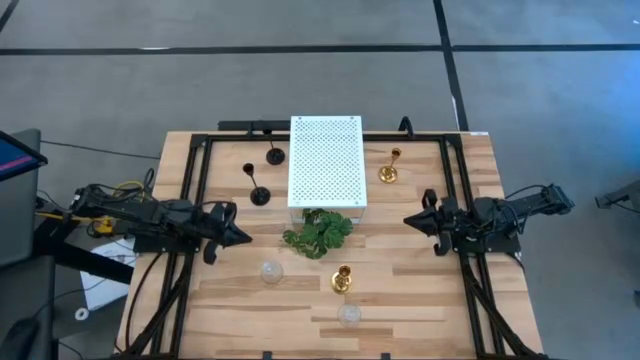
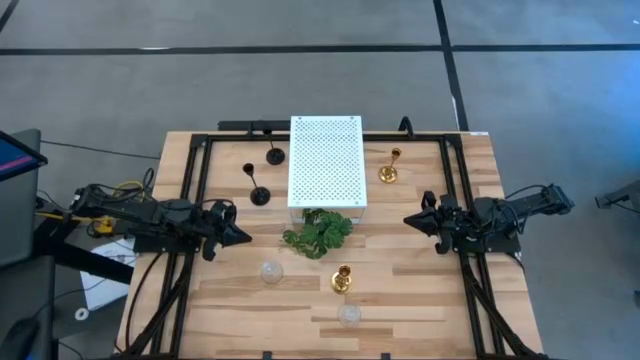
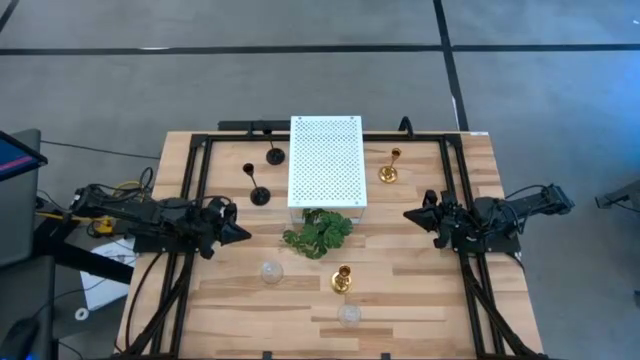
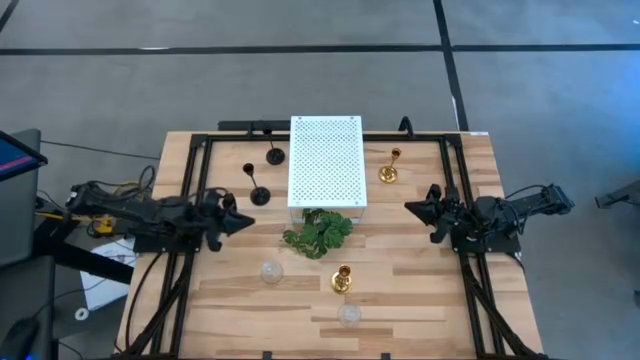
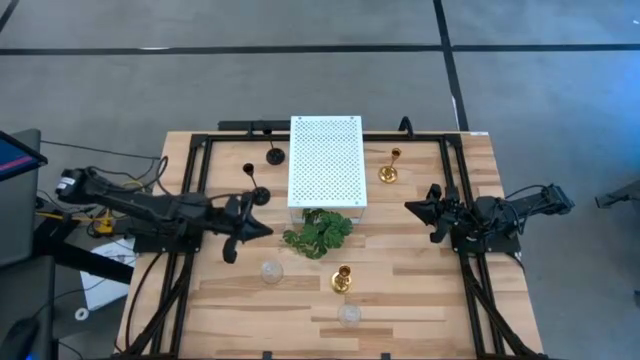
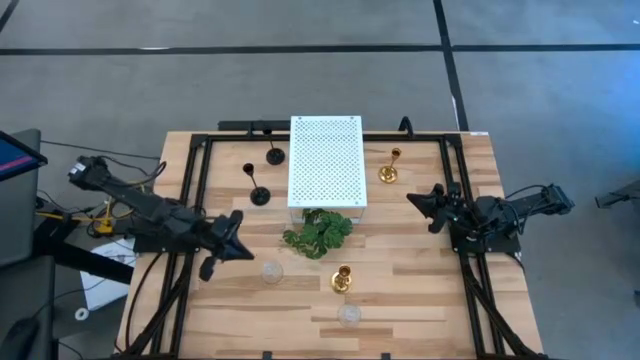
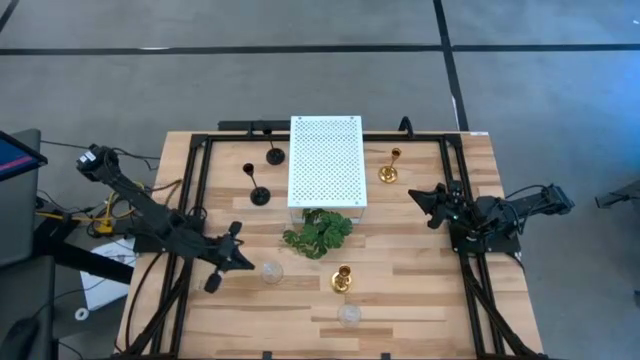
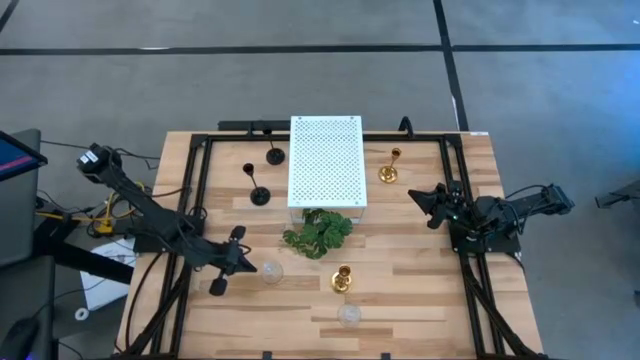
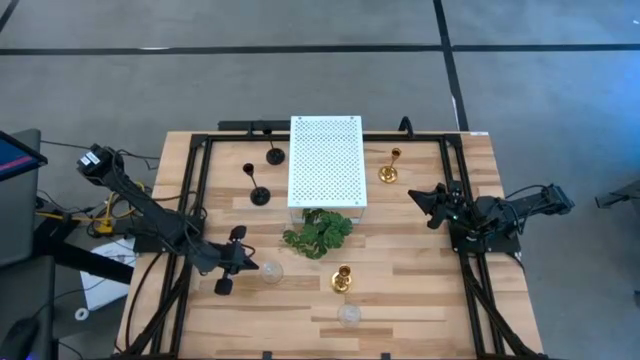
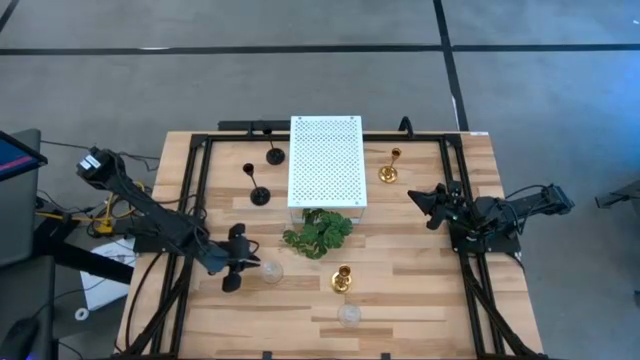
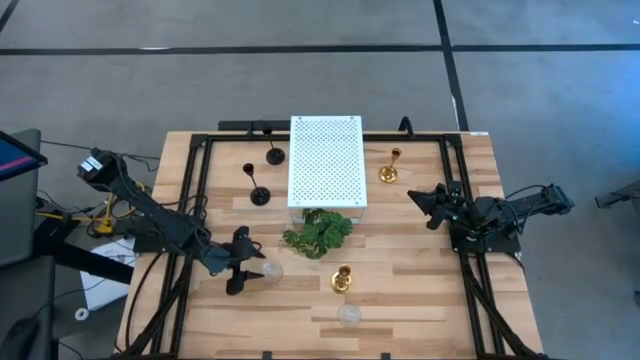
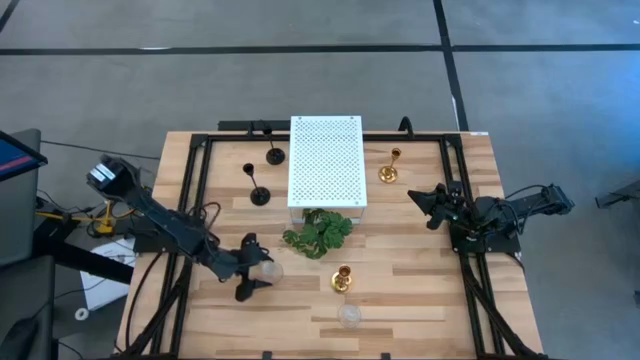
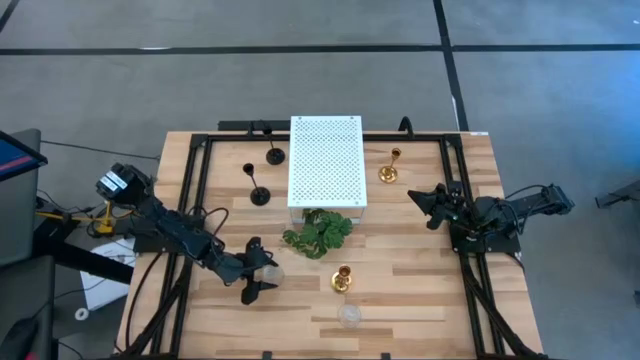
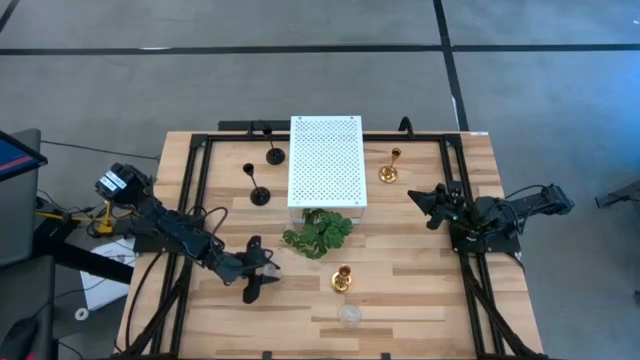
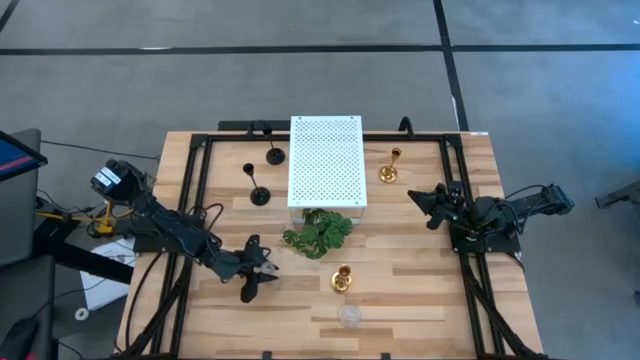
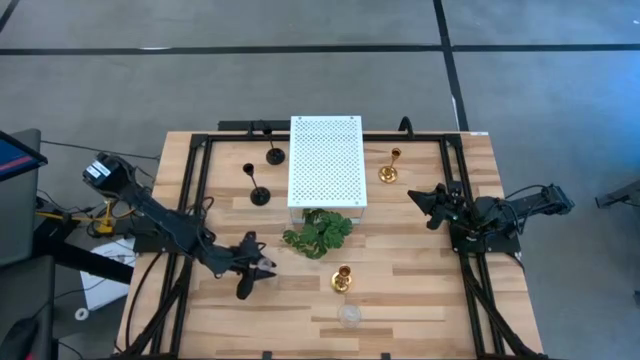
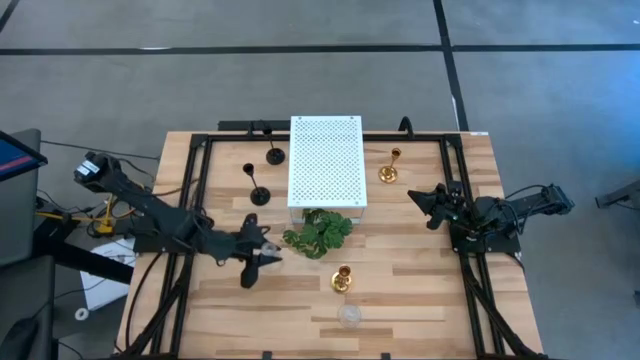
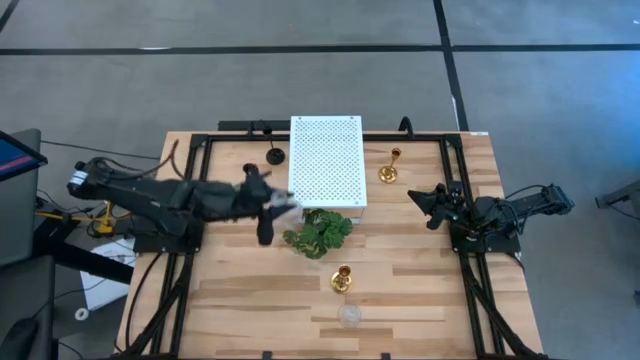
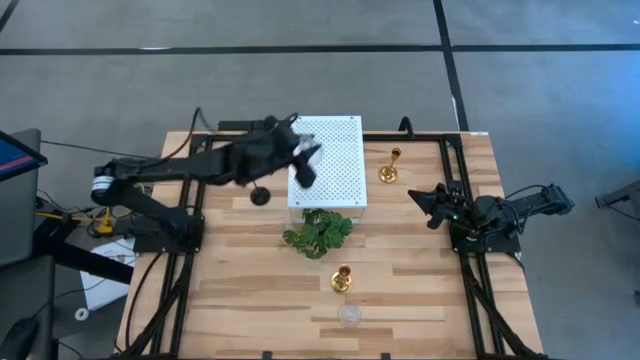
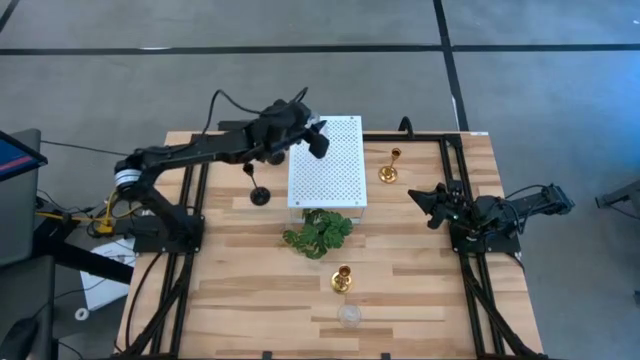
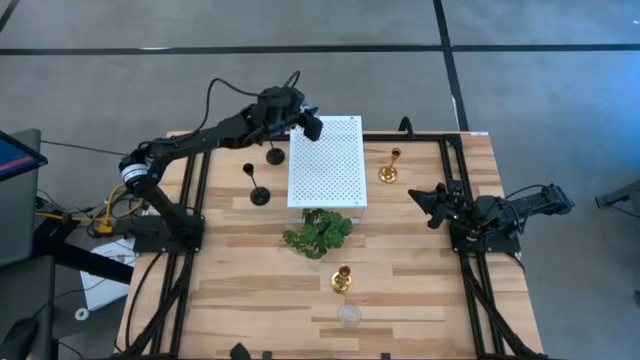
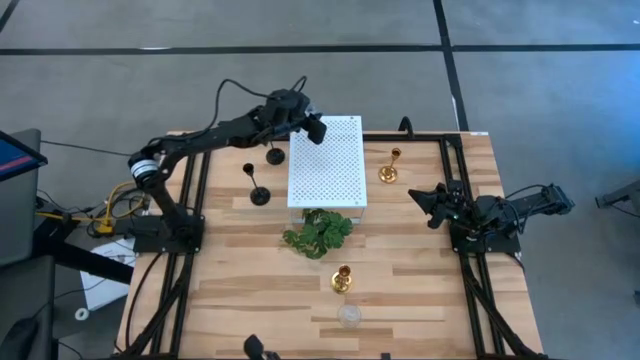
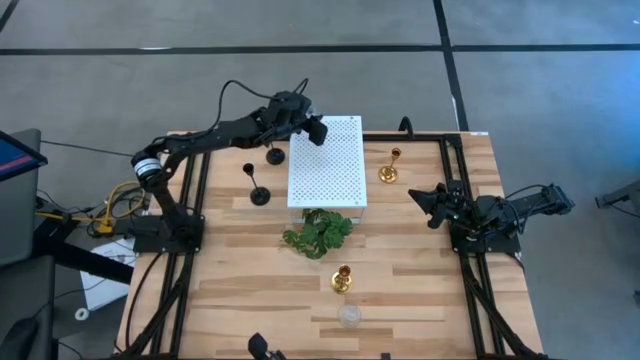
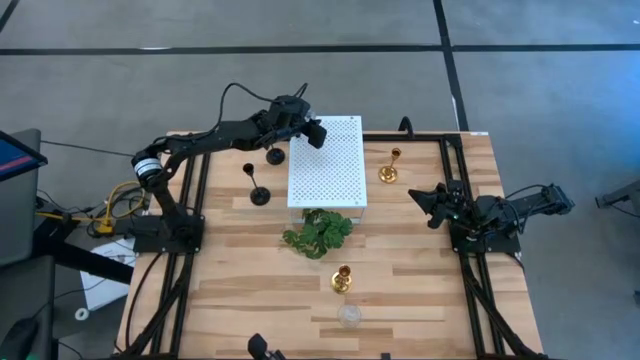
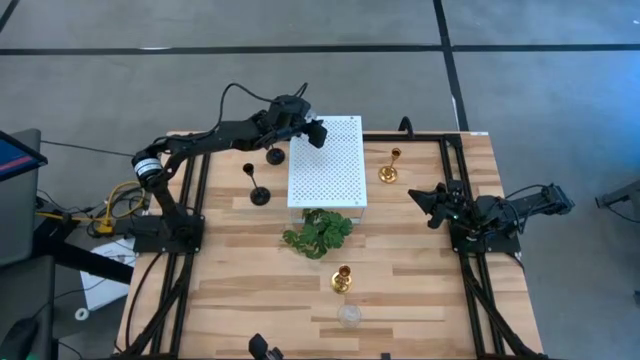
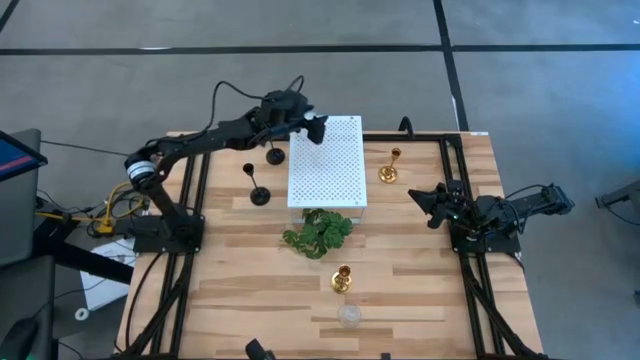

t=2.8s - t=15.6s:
Task: Pick & Place candle stick holders
Put the top transparent candle holder on the shelf

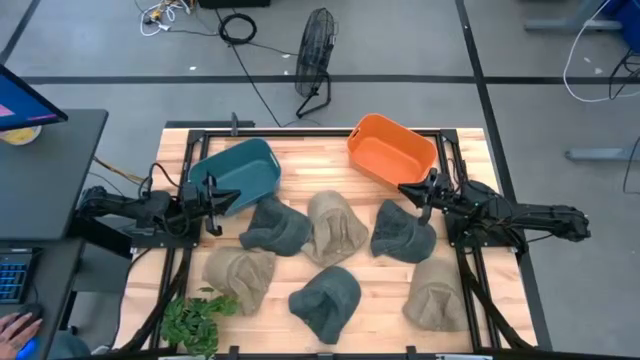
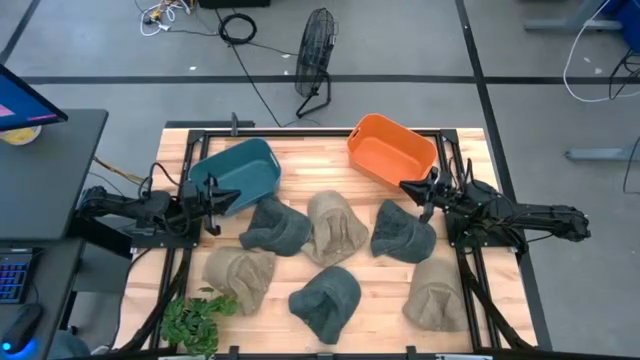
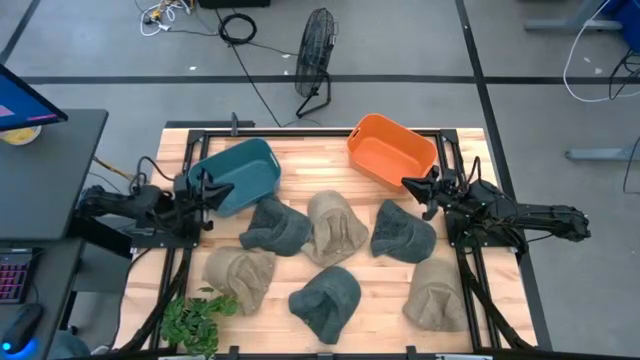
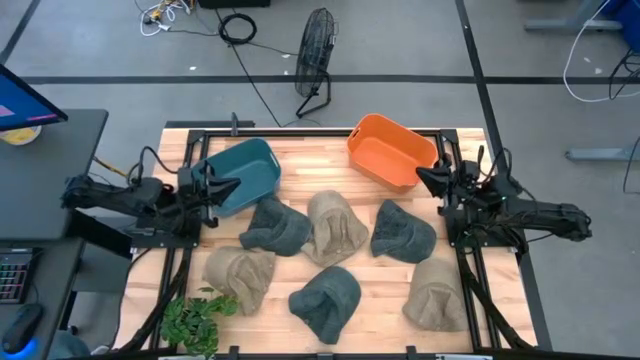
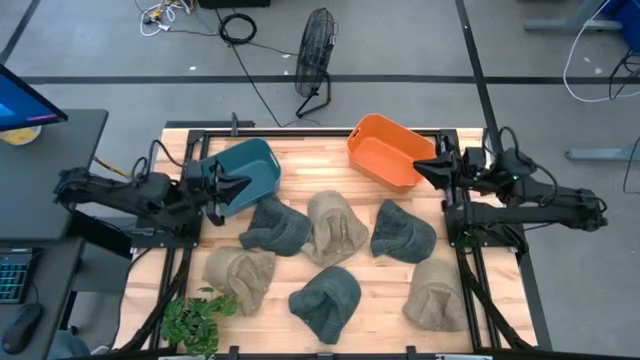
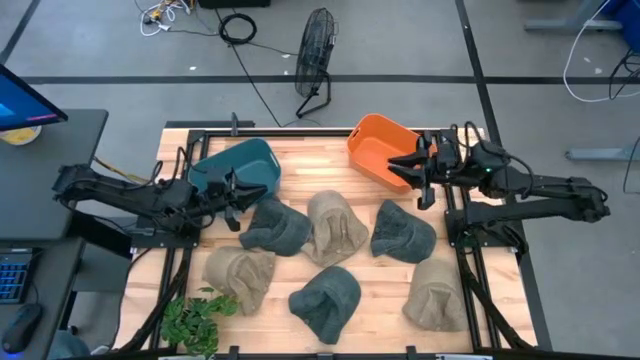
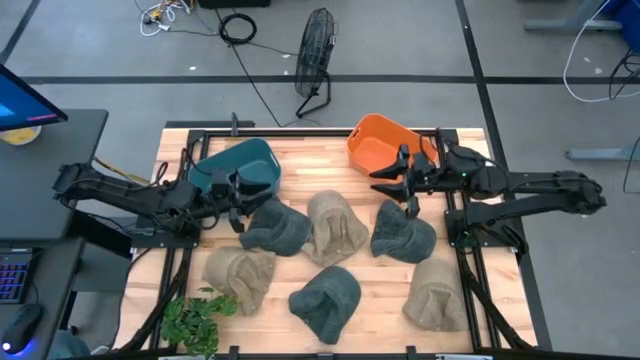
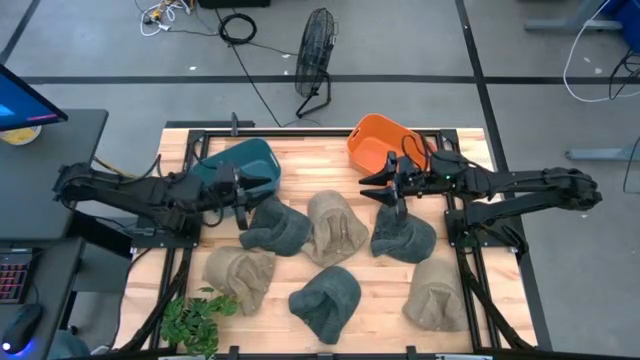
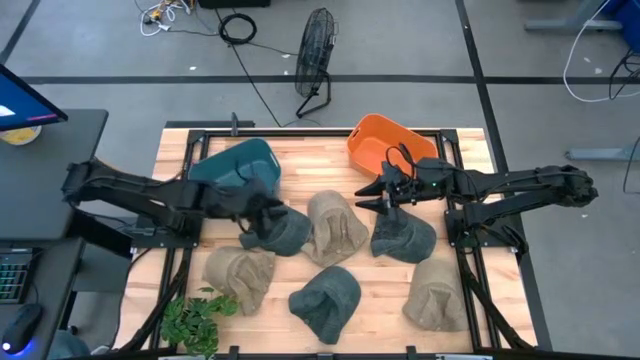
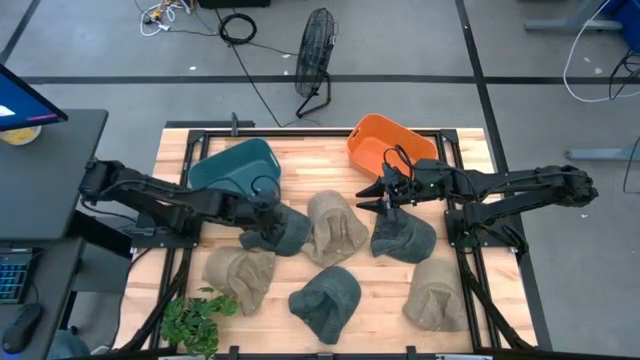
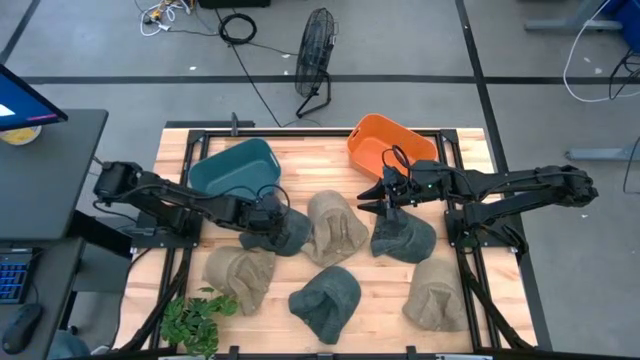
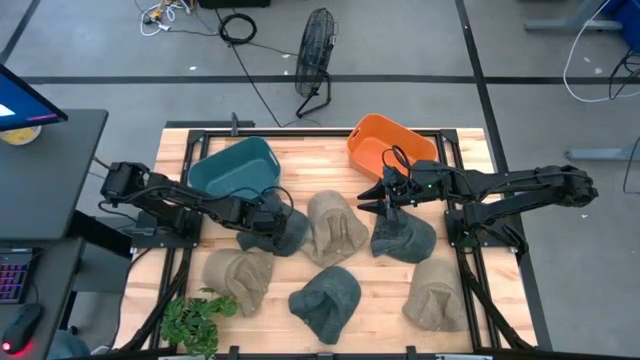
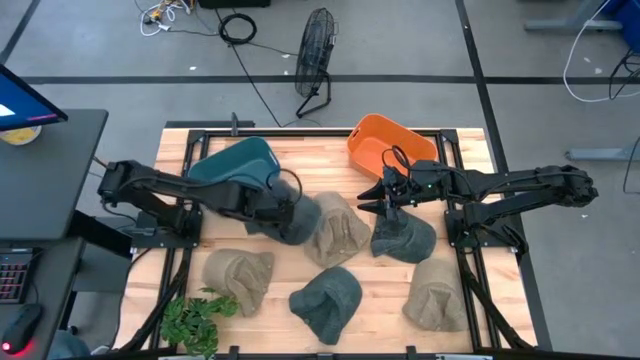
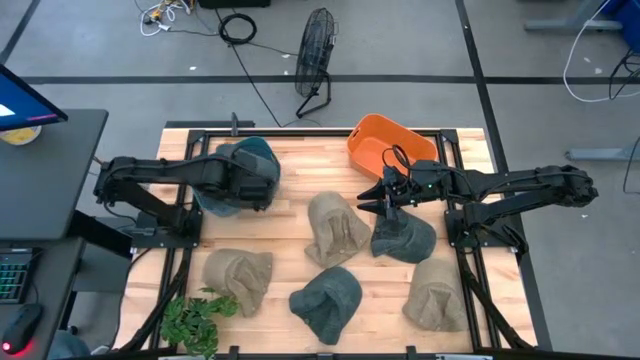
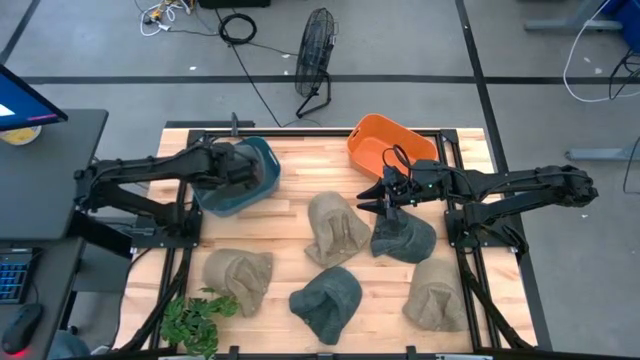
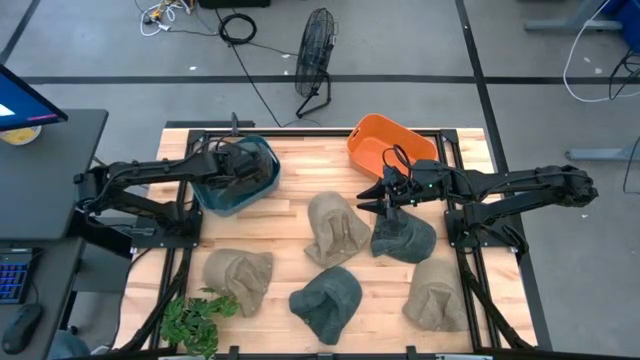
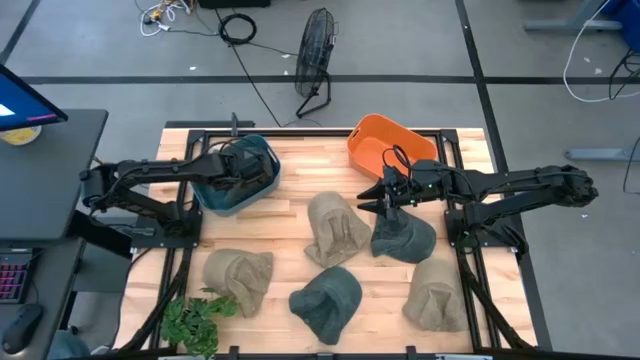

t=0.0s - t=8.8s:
Task: Pick & Place hat
Put the top left black cap into the blue bin
